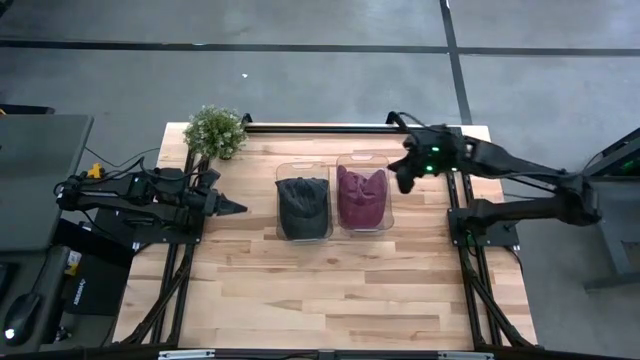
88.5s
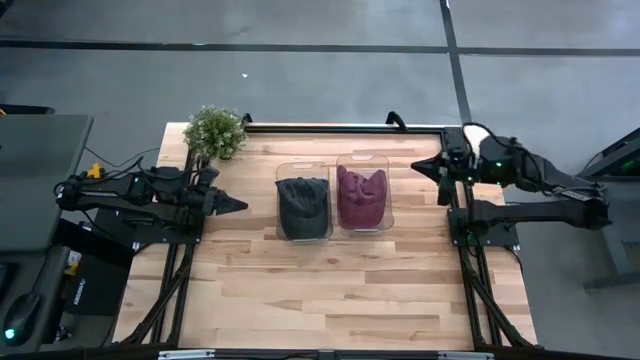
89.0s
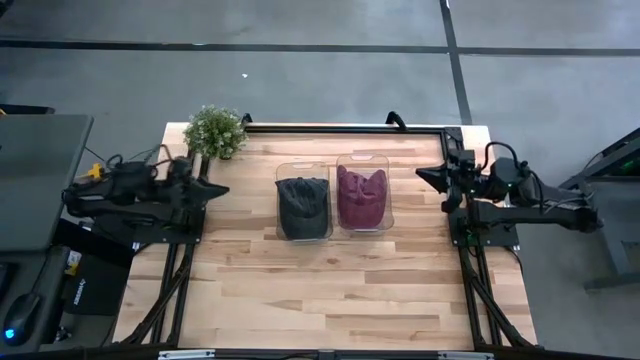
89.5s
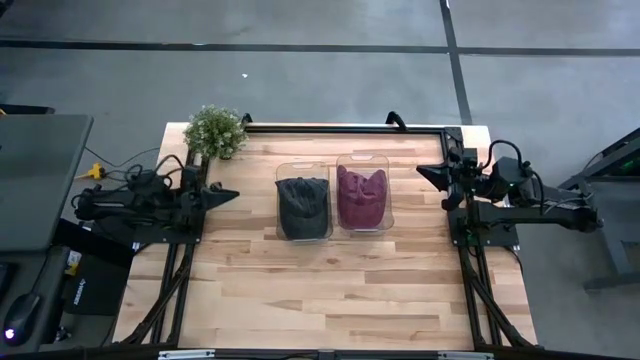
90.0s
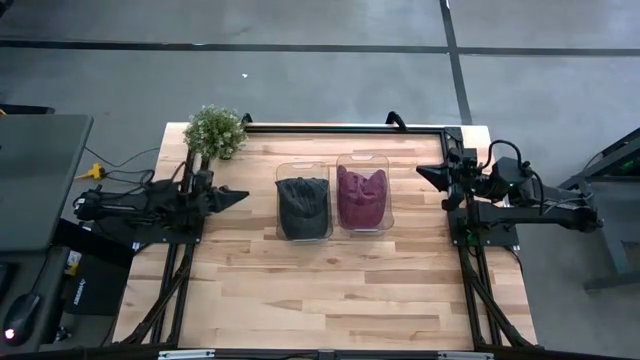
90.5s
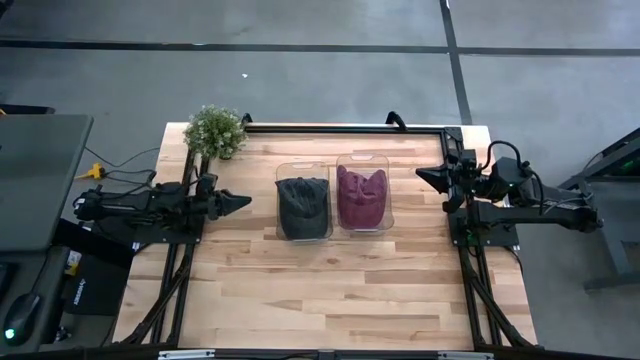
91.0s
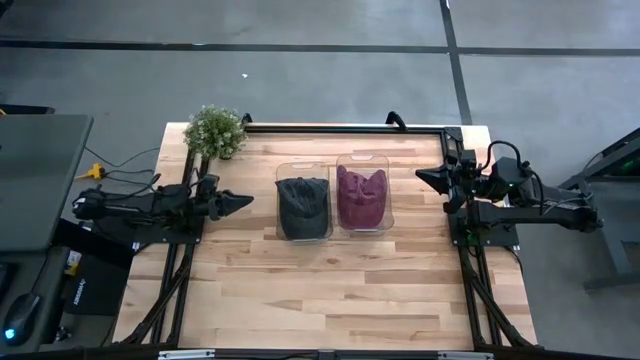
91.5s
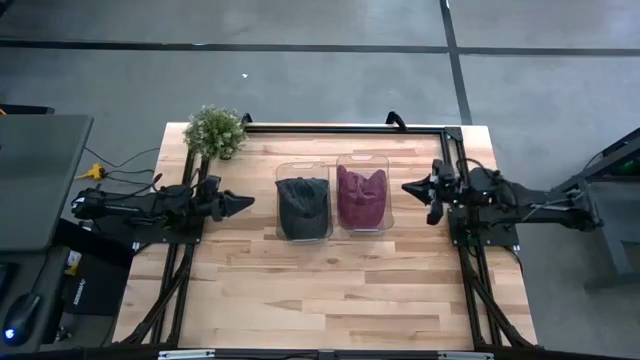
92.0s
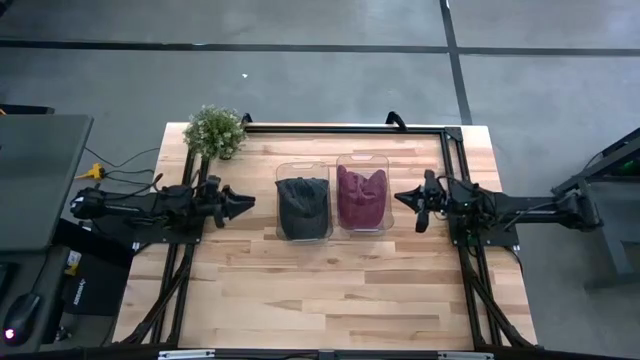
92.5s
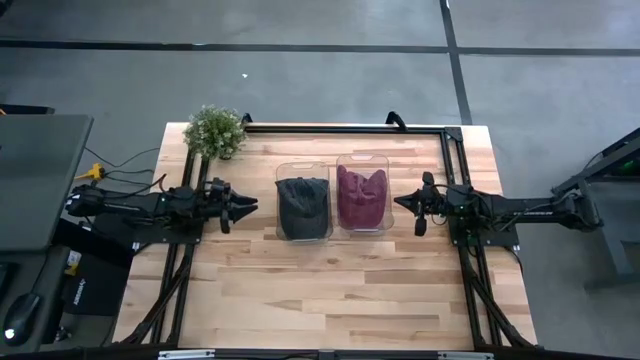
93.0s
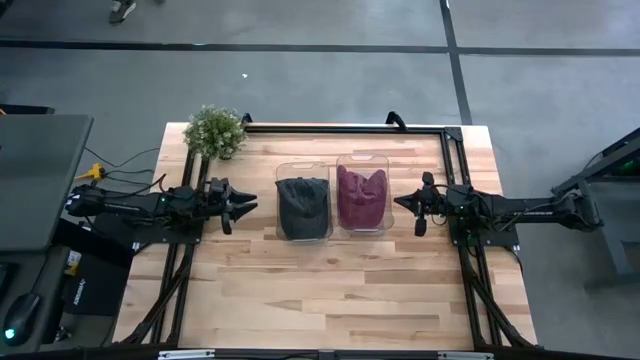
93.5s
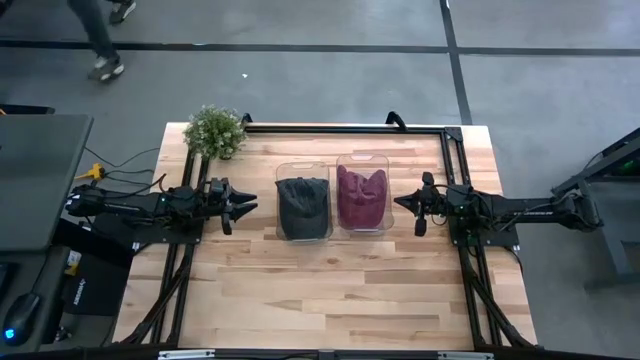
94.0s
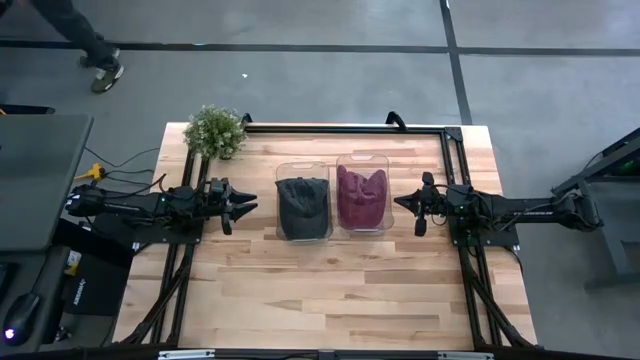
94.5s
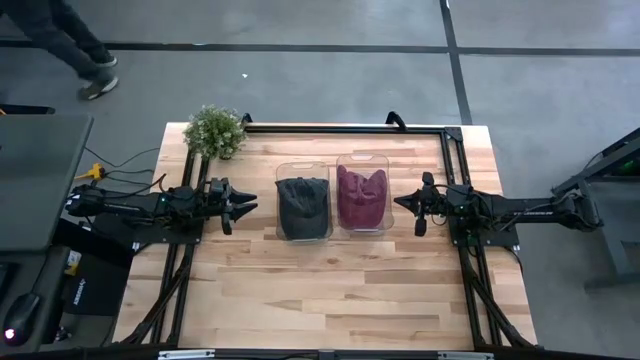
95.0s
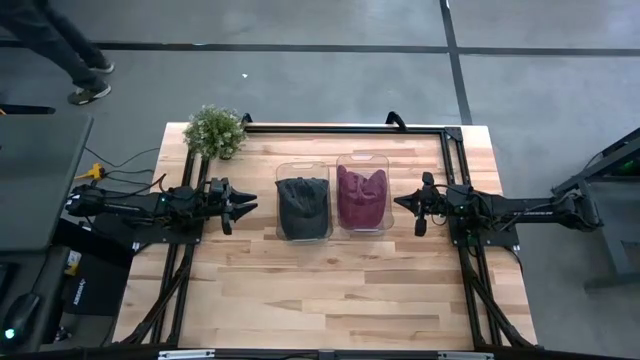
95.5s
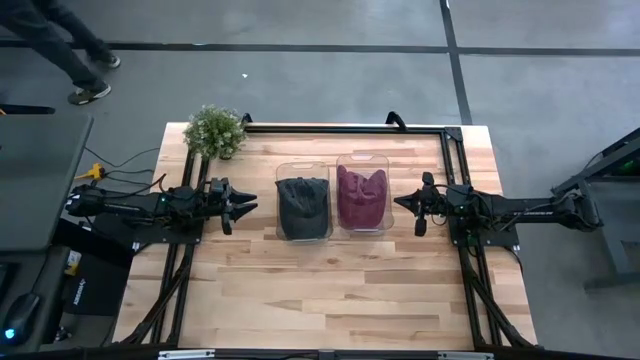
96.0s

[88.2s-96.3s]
Task: Pick & Place hat
Return to Home Position

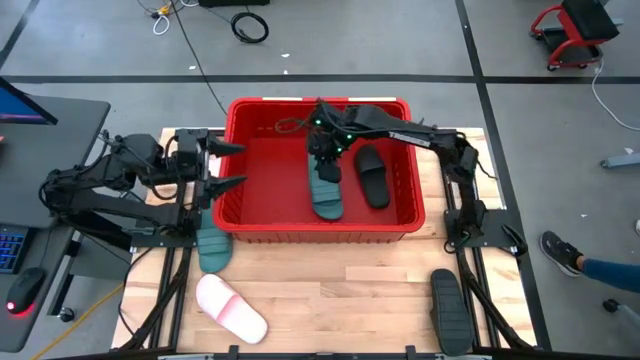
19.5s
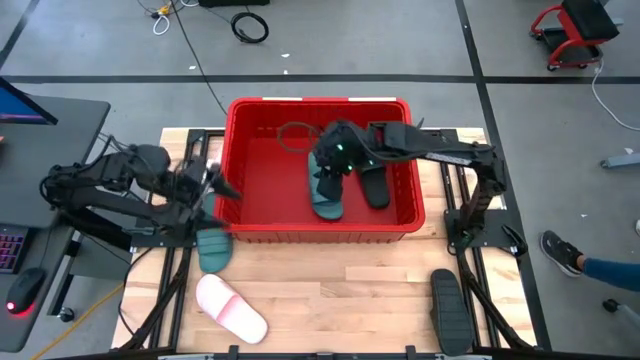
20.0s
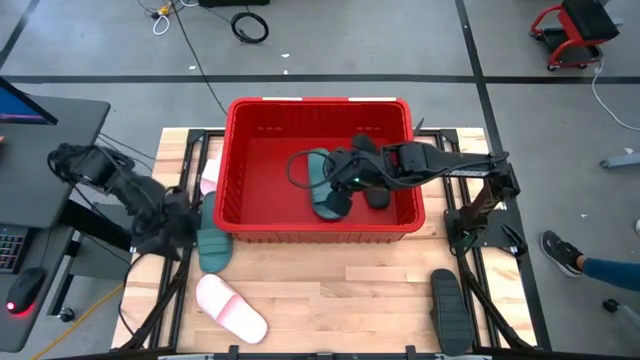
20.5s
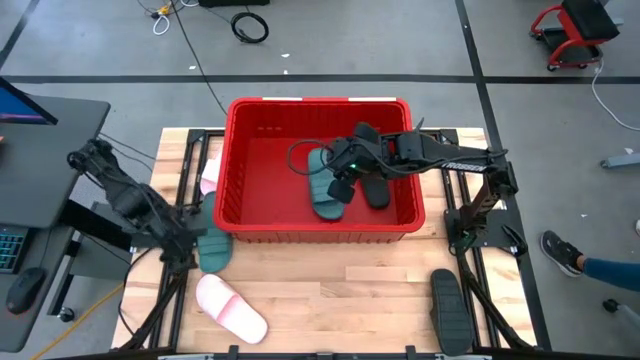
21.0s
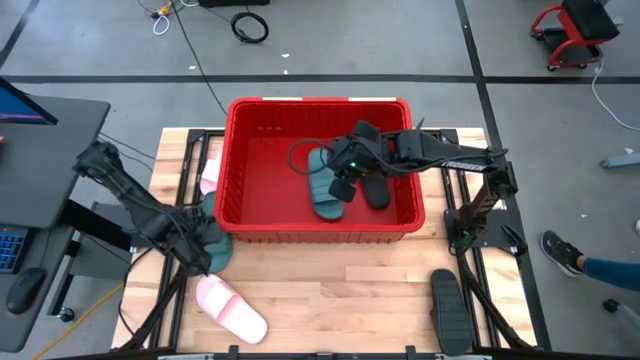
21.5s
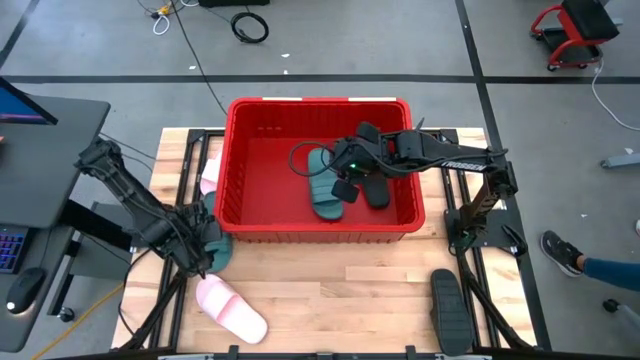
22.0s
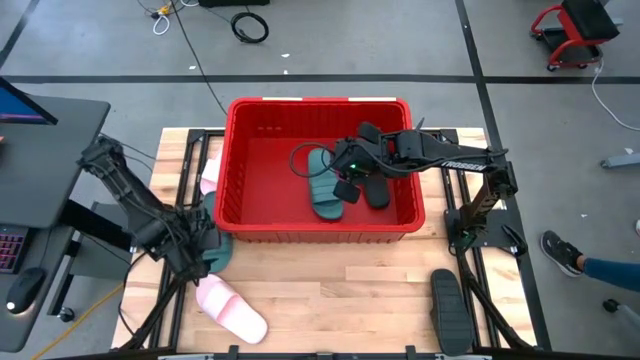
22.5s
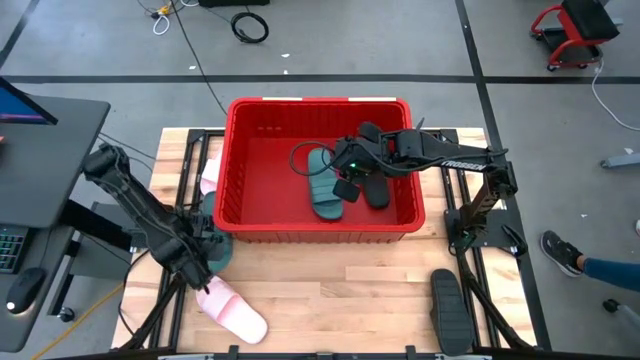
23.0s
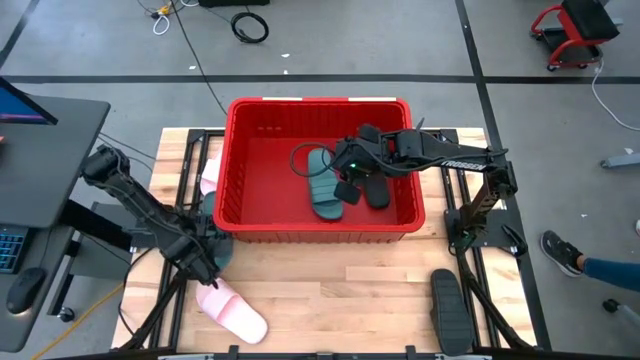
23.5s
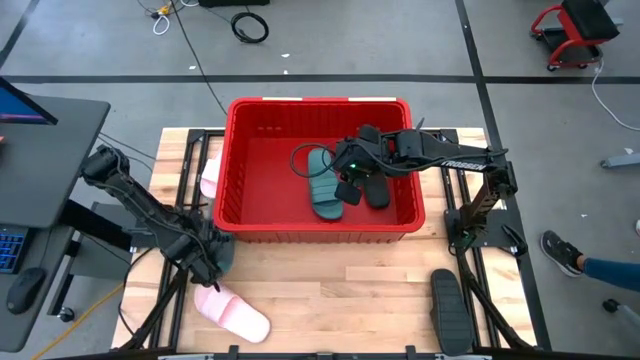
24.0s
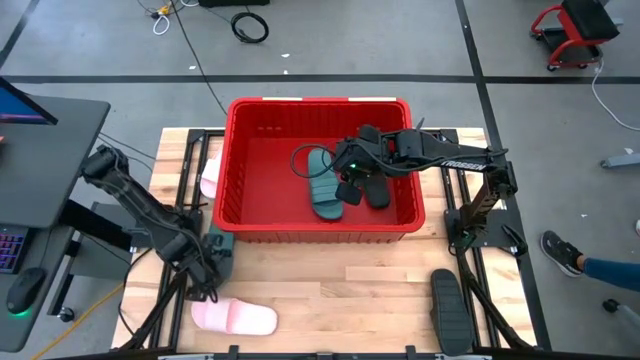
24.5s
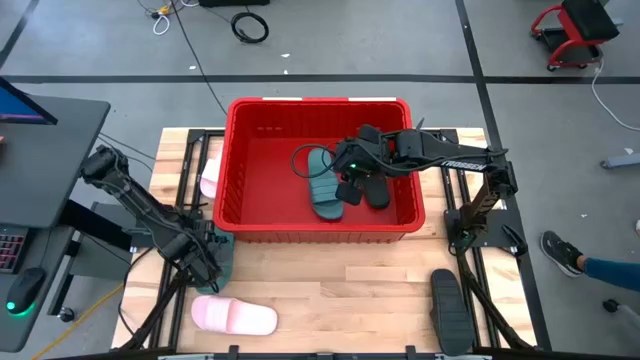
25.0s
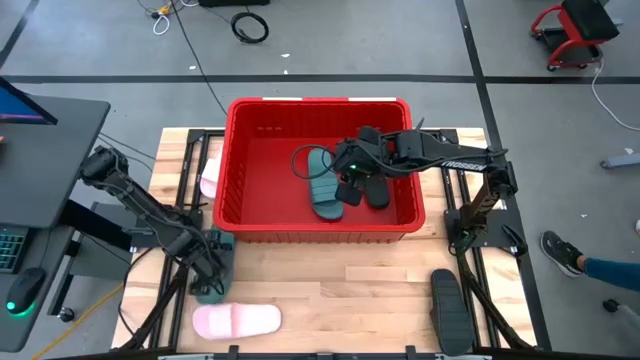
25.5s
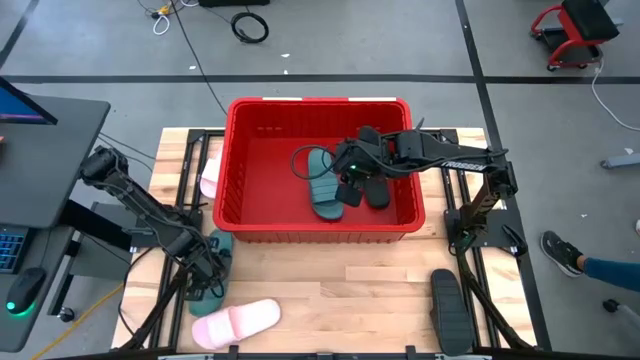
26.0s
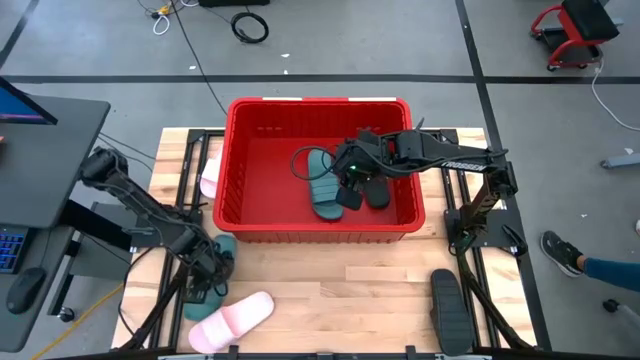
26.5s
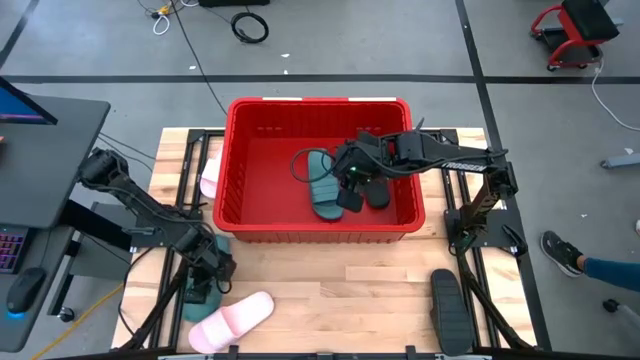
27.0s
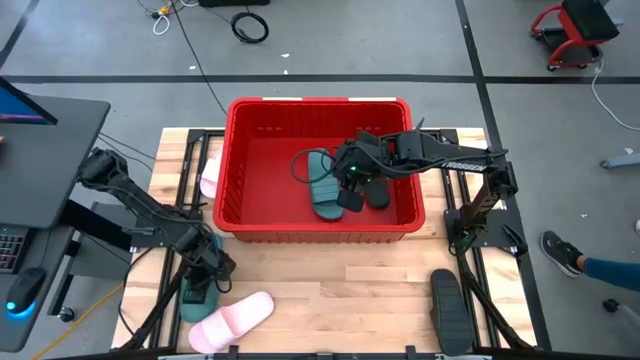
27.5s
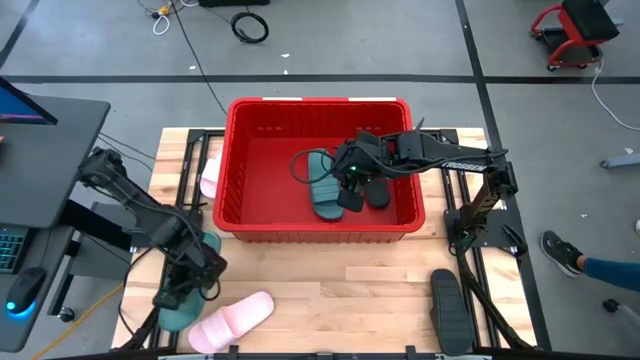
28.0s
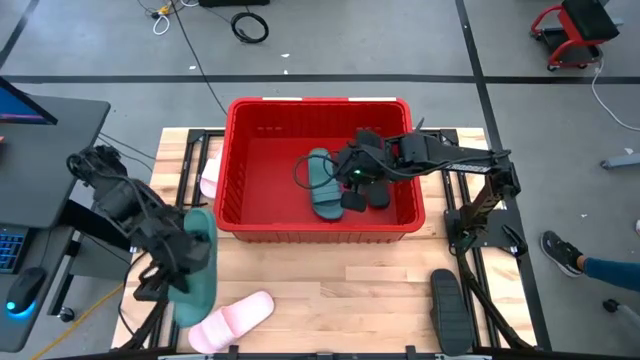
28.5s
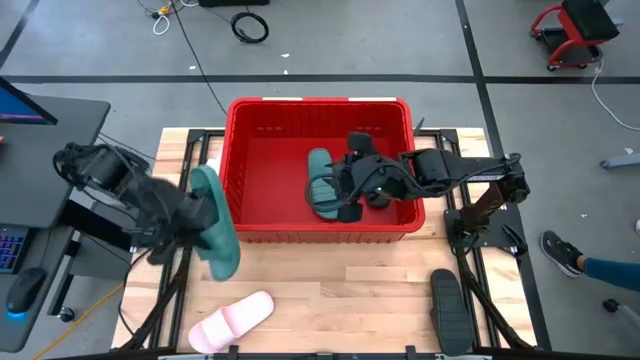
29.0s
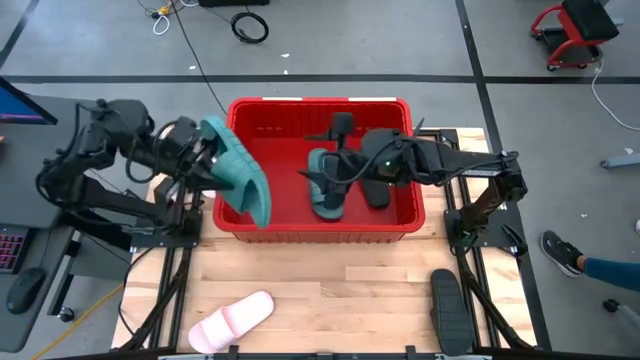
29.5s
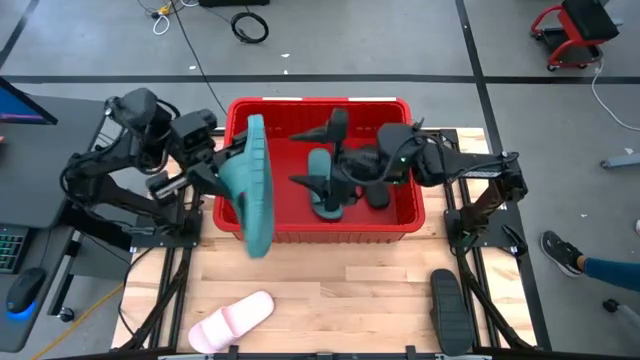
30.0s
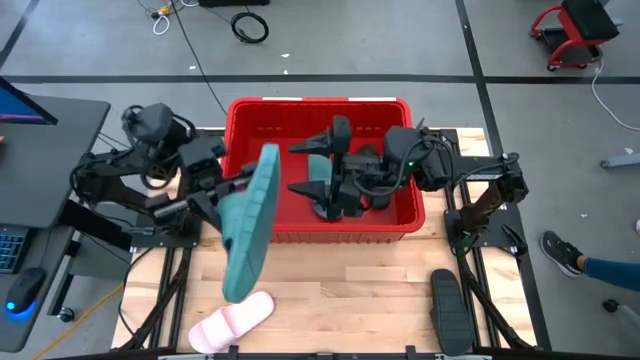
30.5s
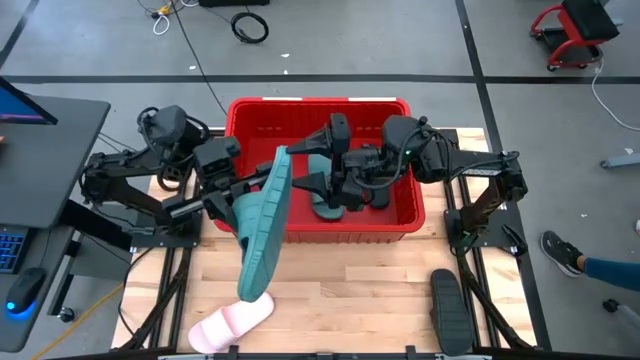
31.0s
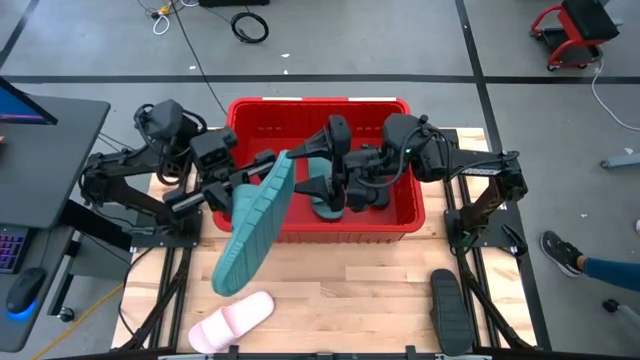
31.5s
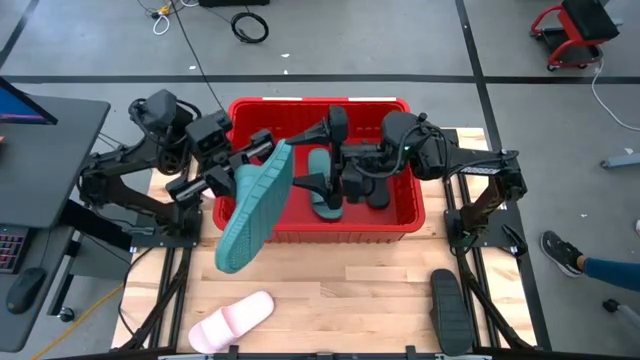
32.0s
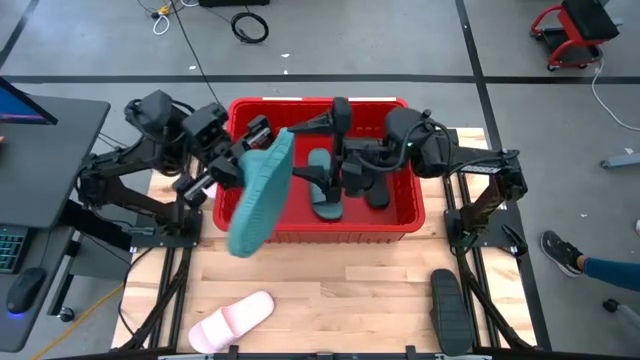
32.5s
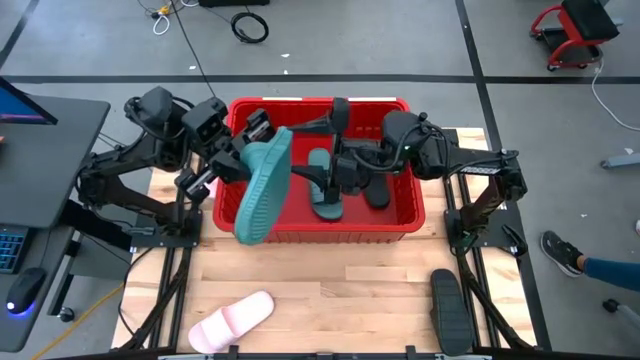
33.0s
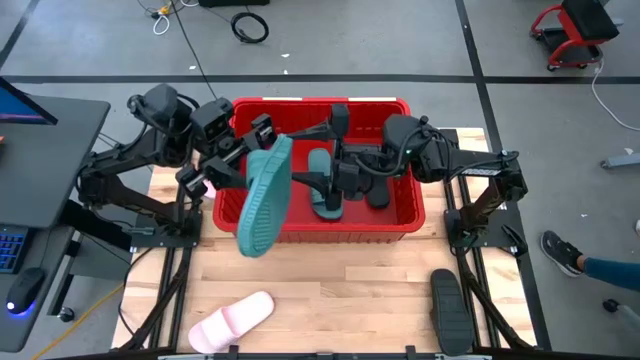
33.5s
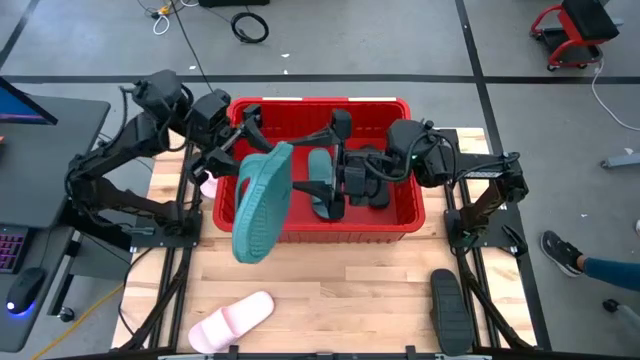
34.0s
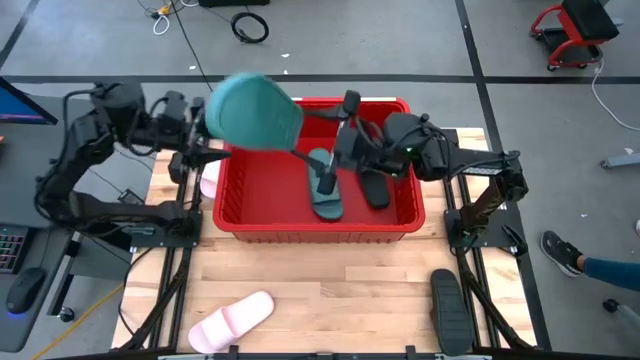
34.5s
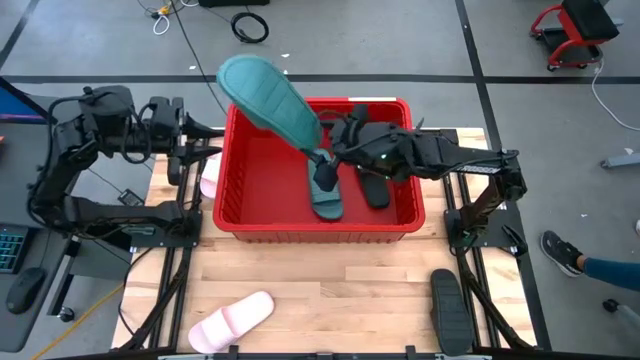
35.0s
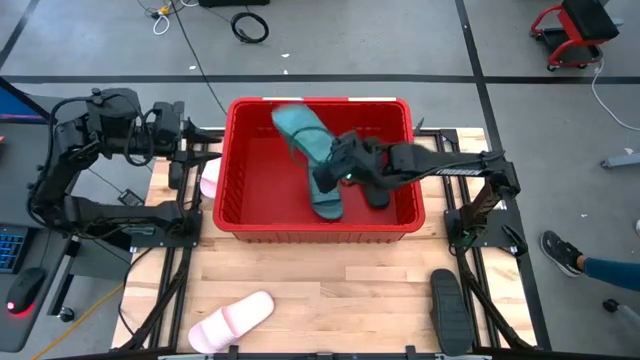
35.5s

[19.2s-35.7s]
Task: Pick and place slides into bin
Put the green slide into the red bin
